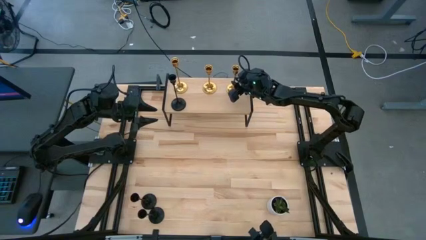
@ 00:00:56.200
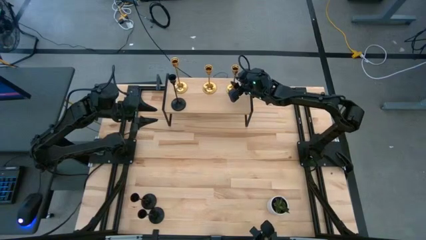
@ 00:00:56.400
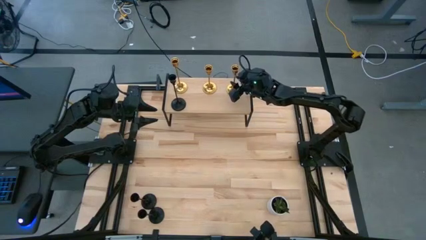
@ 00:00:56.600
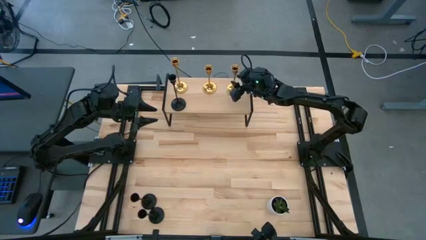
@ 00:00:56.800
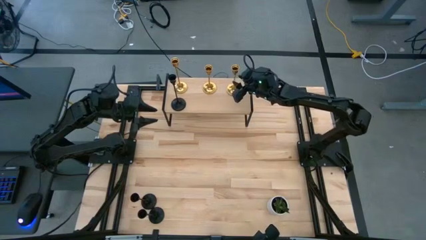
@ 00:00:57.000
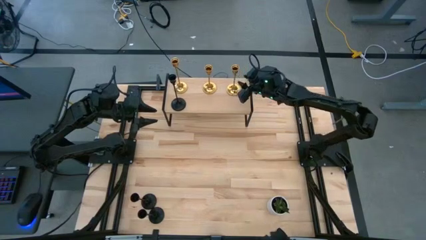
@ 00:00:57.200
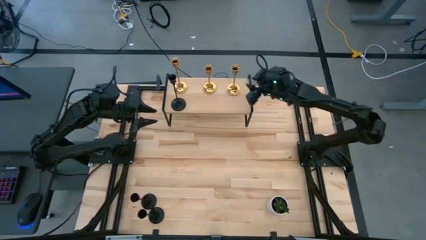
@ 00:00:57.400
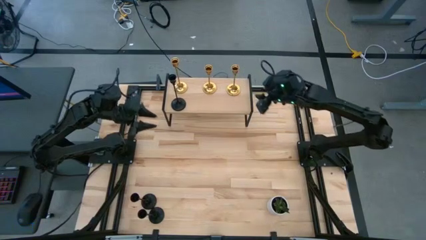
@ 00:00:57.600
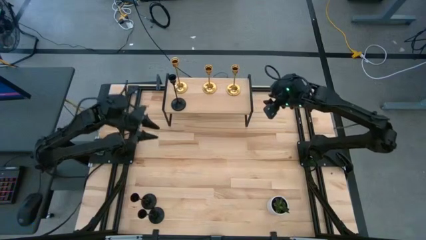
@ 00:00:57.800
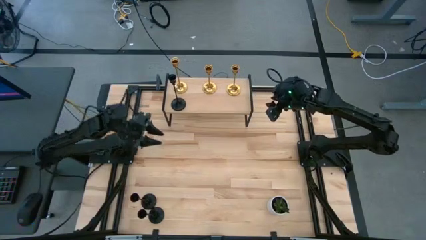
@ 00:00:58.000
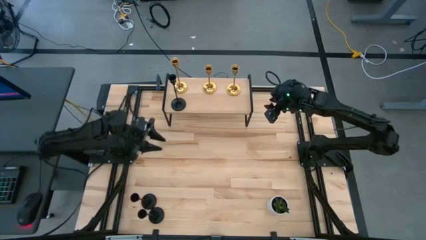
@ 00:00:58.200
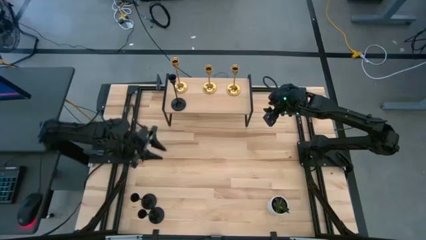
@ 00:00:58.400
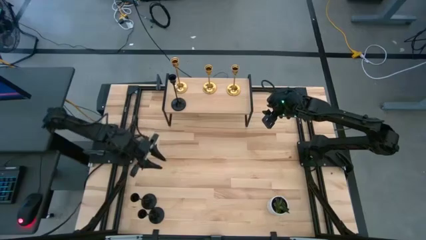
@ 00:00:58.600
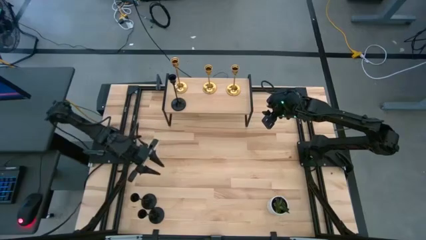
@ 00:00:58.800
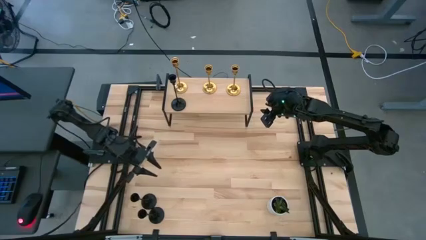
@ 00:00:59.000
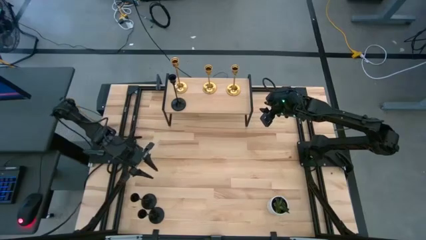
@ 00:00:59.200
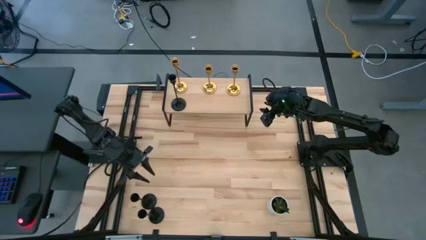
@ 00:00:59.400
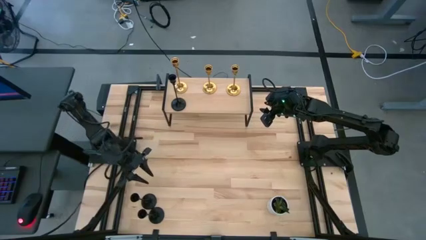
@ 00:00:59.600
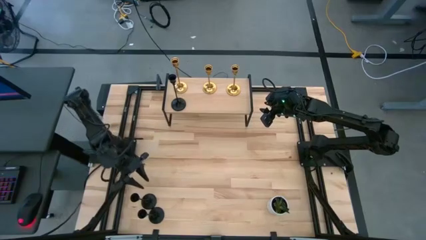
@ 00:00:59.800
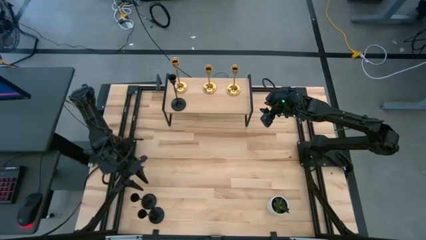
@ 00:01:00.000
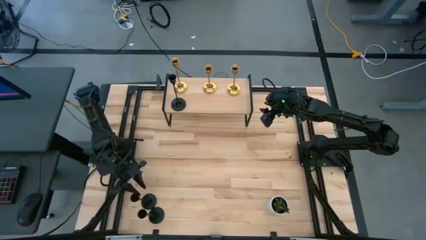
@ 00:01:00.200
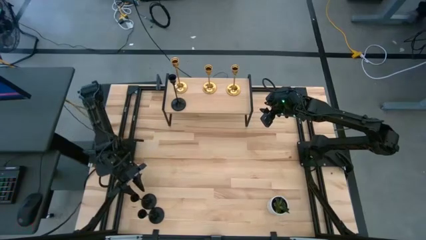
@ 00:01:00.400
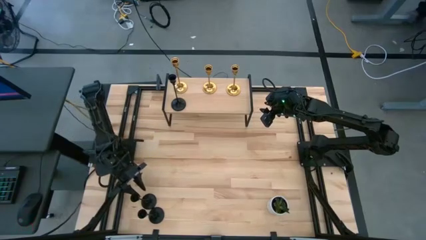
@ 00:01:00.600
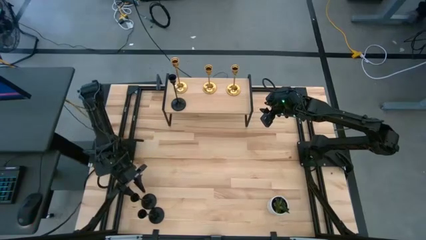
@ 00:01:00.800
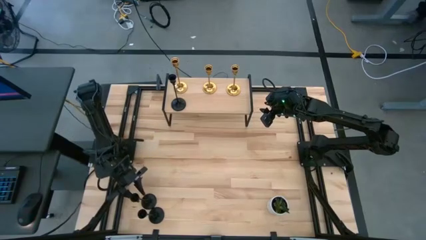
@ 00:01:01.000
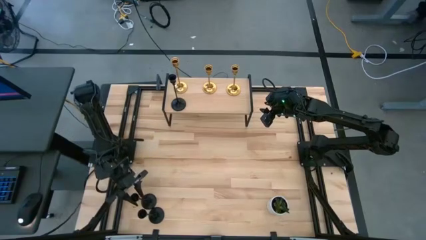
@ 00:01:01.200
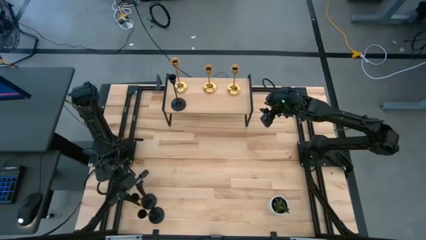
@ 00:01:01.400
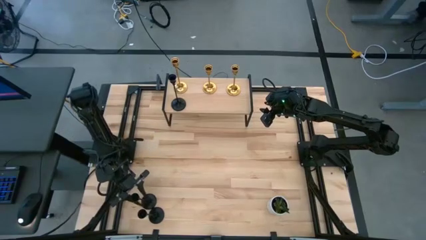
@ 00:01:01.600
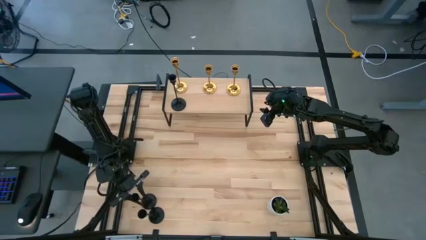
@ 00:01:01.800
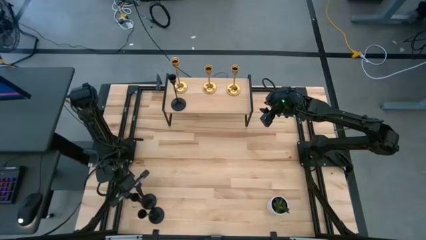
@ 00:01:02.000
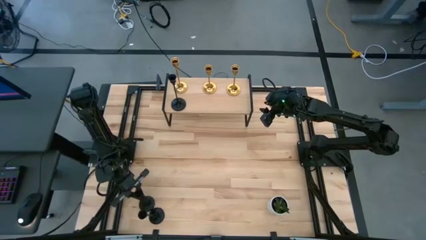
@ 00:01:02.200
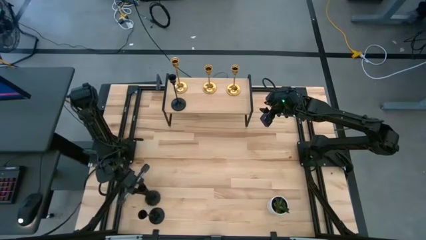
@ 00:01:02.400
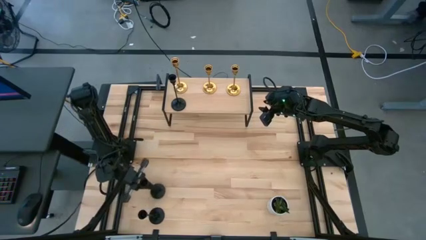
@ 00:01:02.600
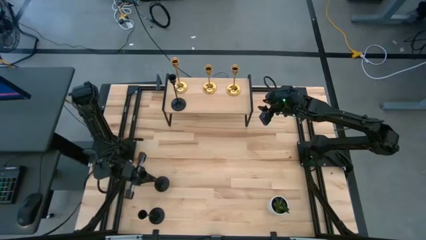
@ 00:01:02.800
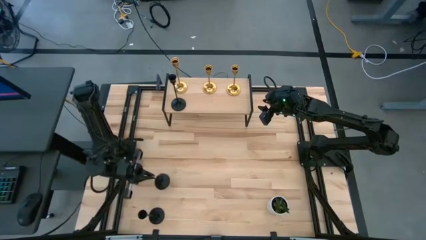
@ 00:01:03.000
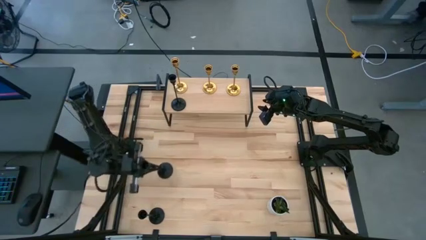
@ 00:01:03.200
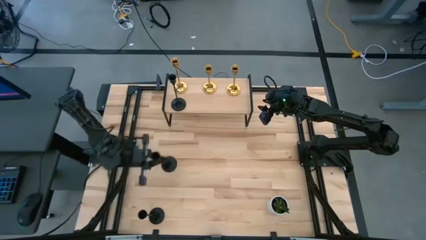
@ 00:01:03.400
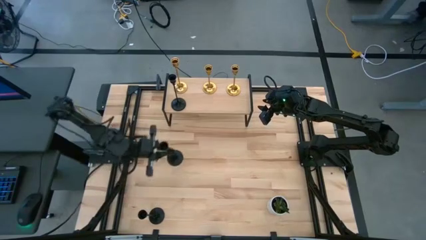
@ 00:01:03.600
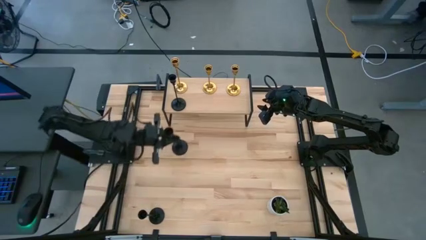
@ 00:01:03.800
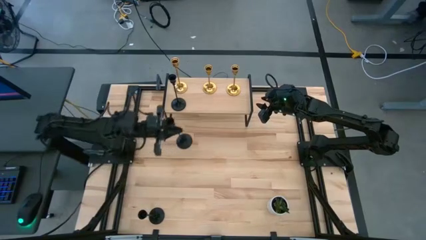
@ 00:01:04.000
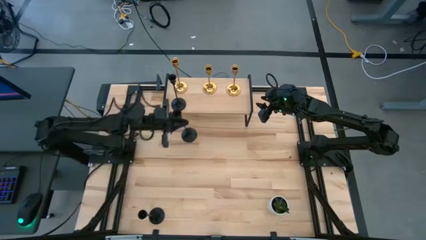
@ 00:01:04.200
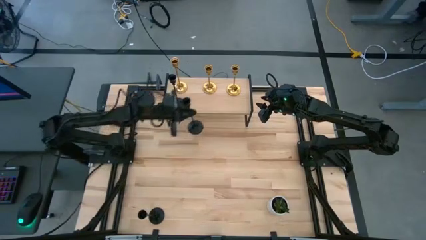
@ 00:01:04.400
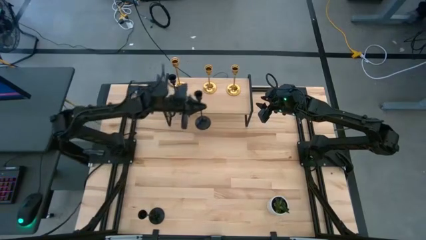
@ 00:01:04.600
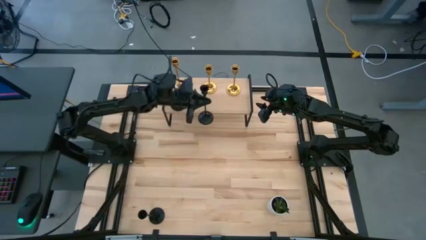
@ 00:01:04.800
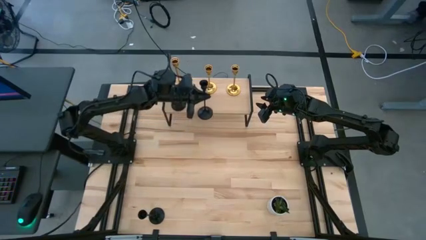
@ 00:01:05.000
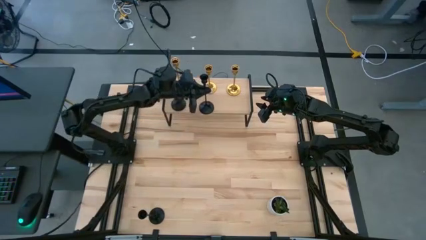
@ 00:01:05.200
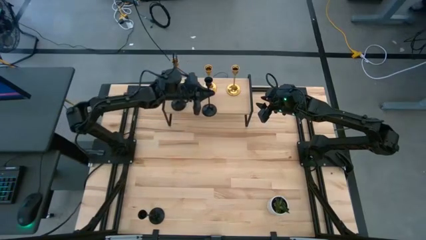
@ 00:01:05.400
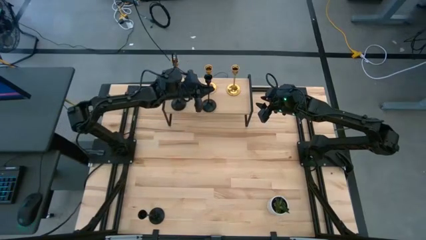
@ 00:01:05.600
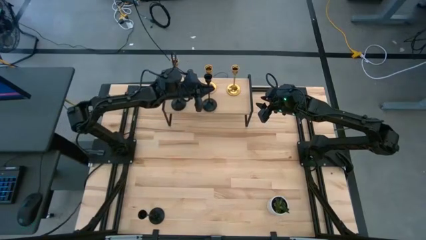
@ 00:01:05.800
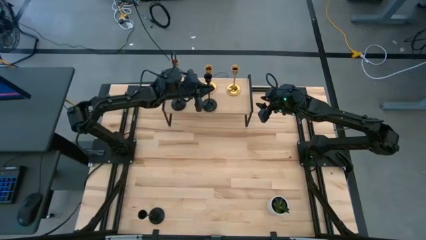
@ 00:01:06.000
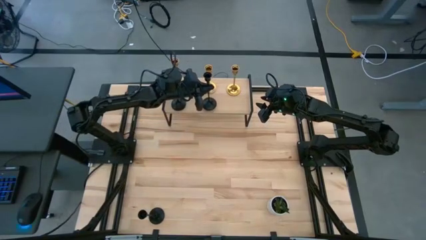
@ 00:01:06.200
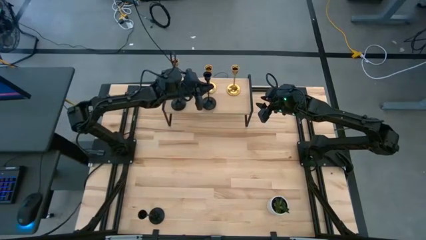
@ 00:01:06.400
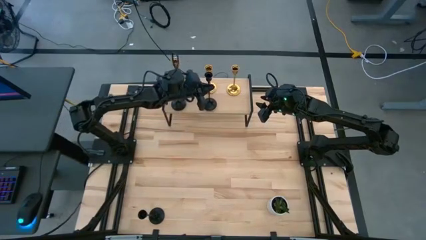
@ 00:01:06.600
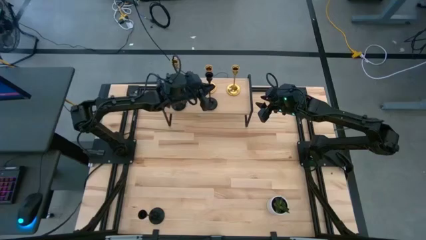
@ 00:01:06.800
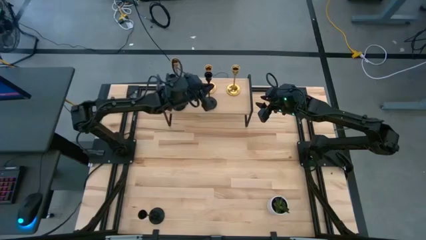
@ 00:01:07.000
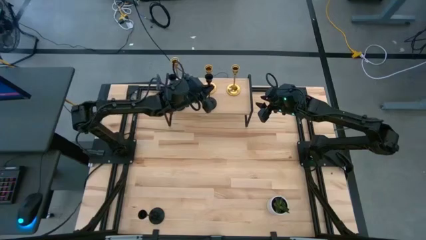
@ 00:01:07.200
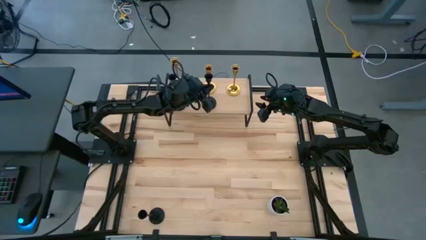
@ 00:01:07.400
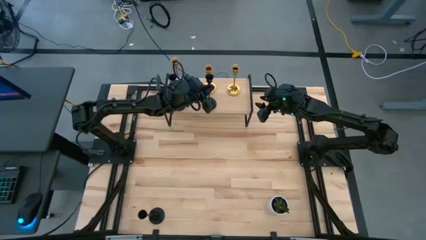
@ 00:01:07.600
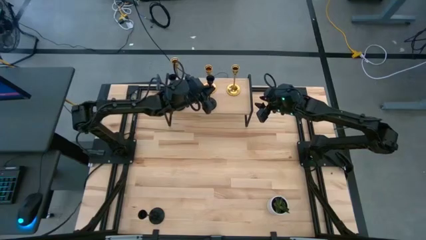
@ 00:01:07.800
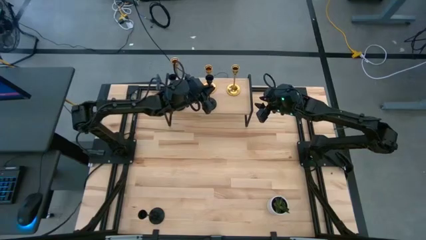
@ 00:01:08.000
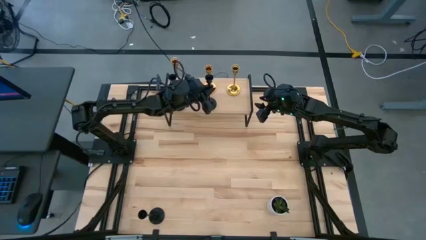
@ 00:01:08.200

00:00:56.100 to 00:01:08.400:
Task: Pick & Place candle stick holders
Put the top black candle holder aligned with the other black candle holder on the shelf
